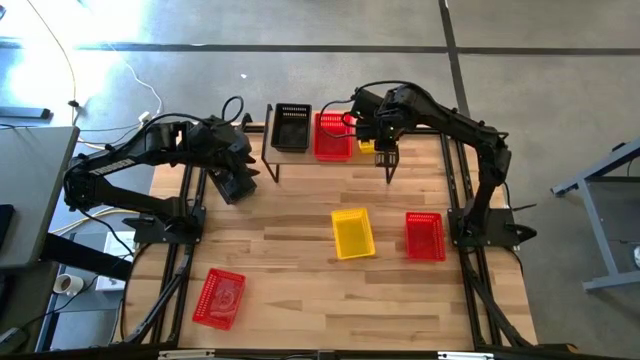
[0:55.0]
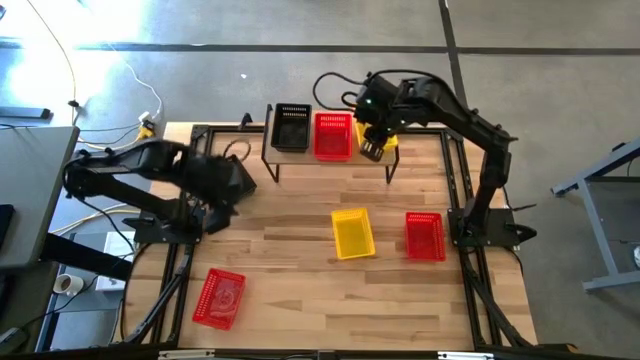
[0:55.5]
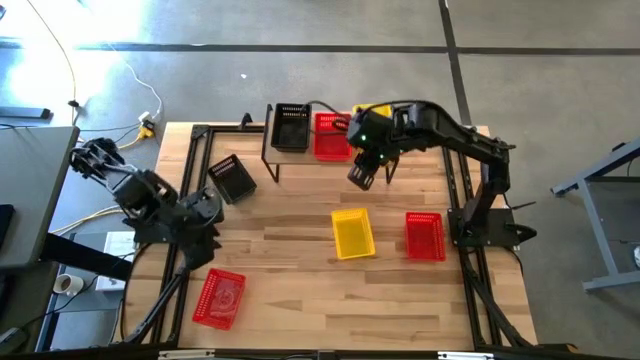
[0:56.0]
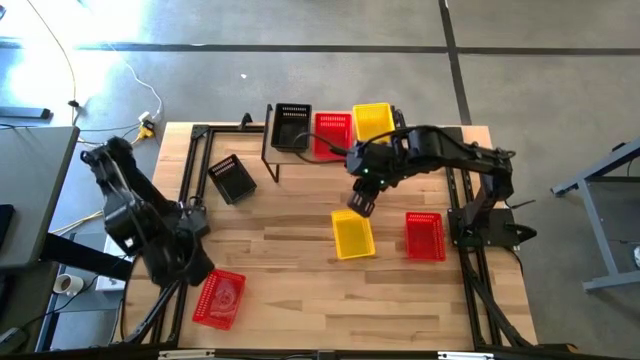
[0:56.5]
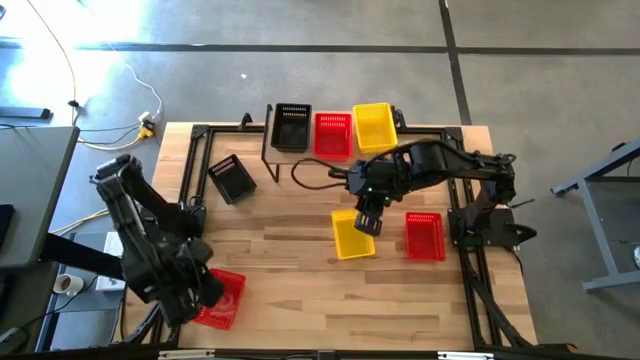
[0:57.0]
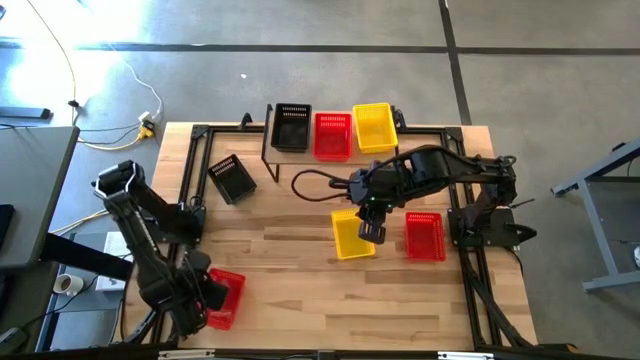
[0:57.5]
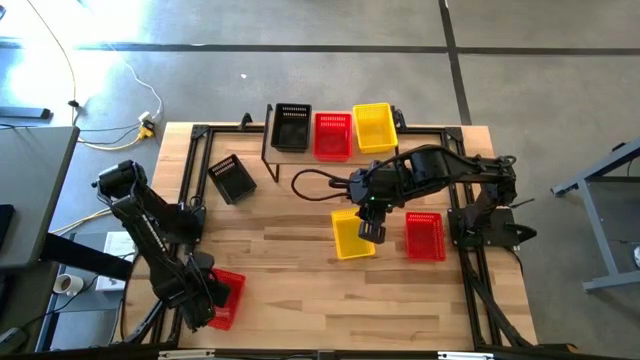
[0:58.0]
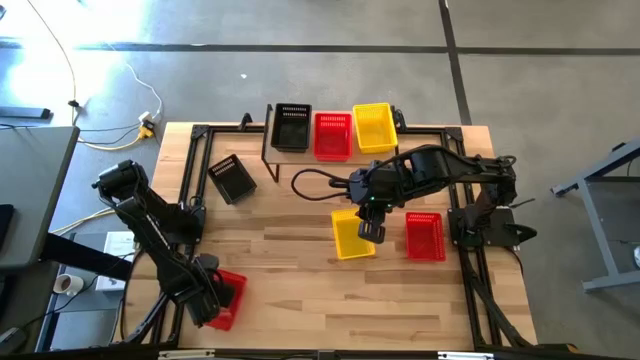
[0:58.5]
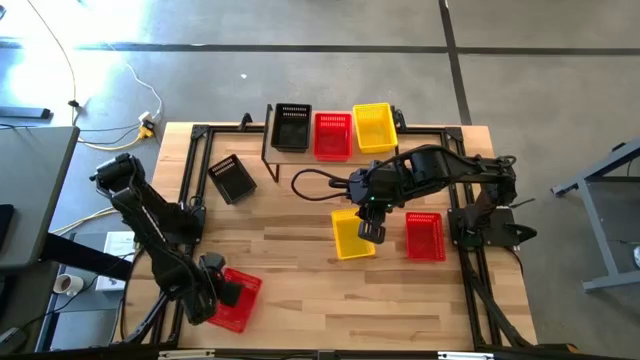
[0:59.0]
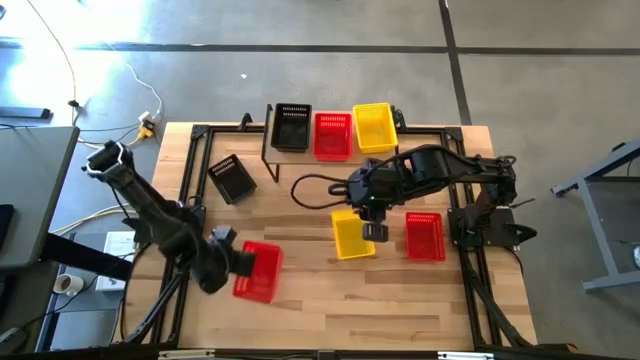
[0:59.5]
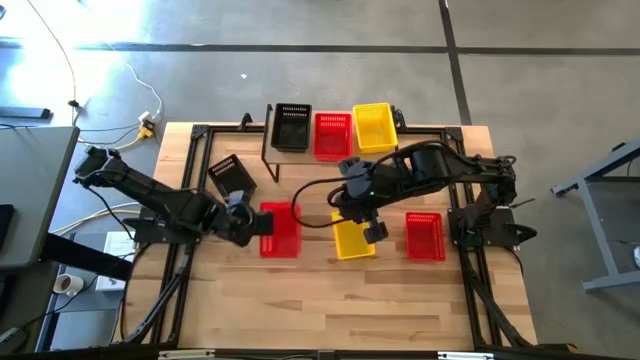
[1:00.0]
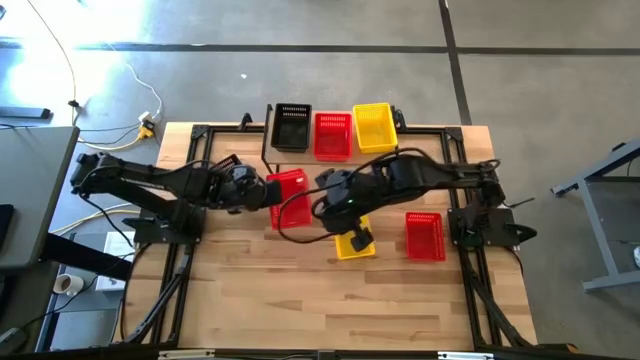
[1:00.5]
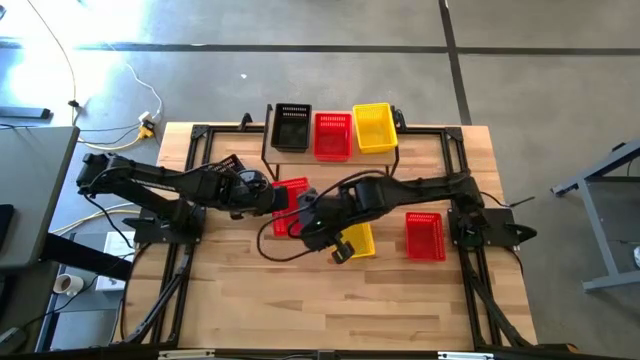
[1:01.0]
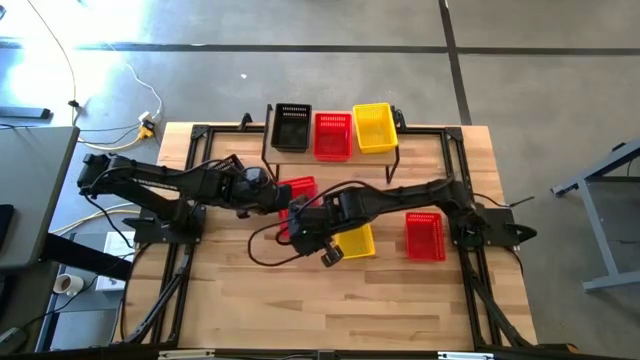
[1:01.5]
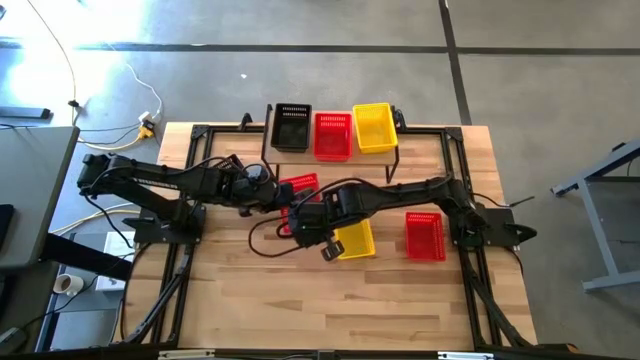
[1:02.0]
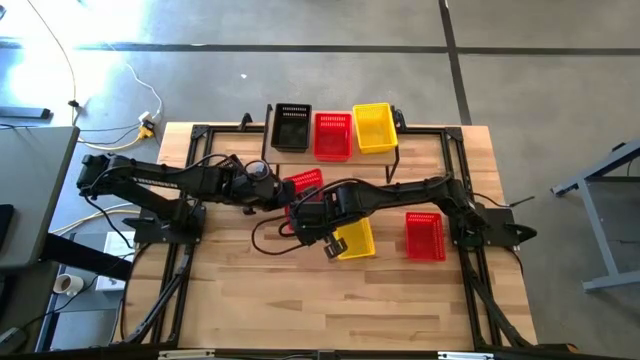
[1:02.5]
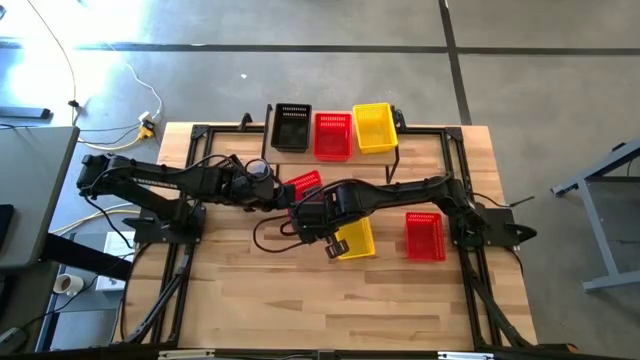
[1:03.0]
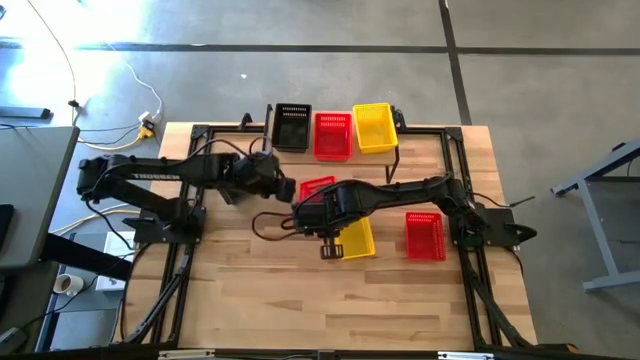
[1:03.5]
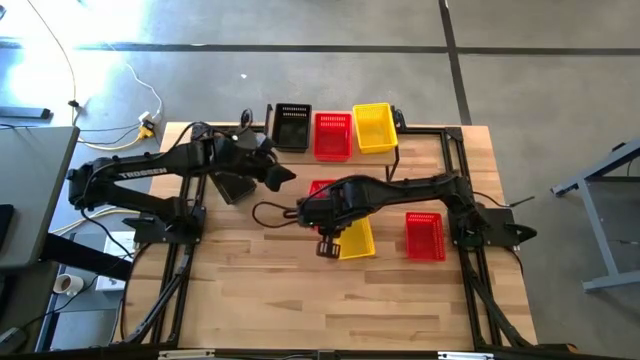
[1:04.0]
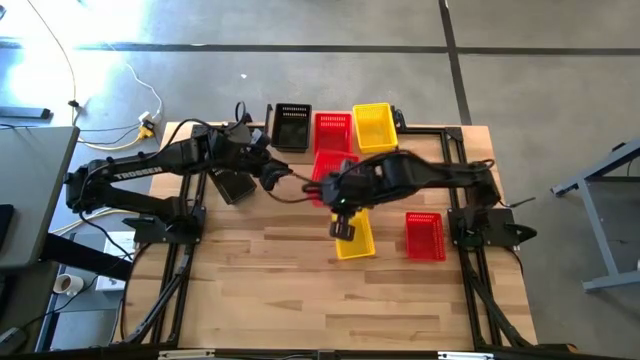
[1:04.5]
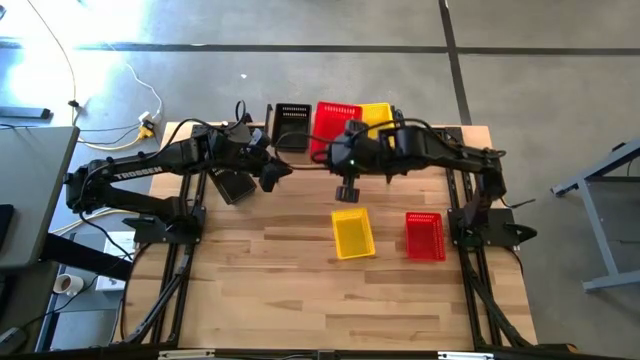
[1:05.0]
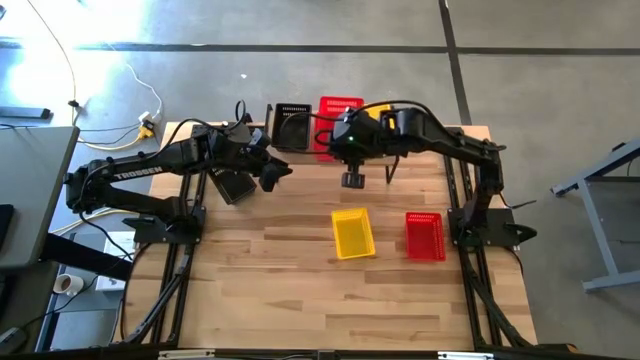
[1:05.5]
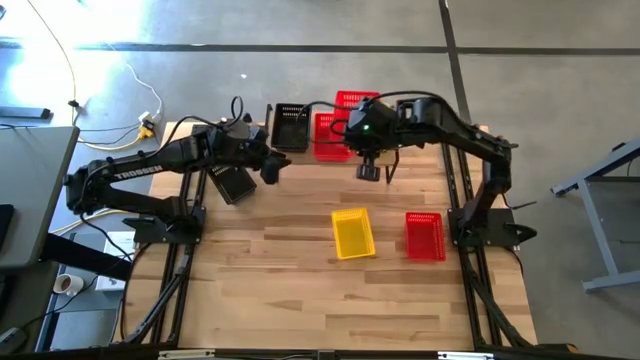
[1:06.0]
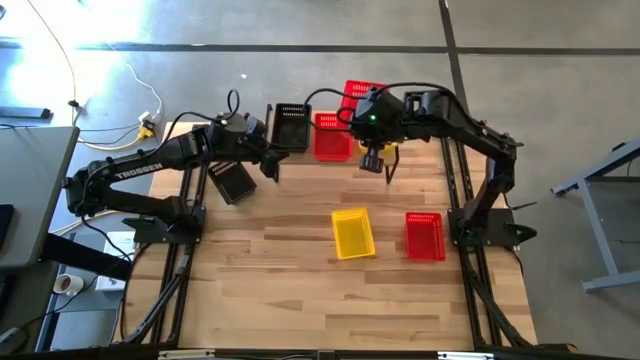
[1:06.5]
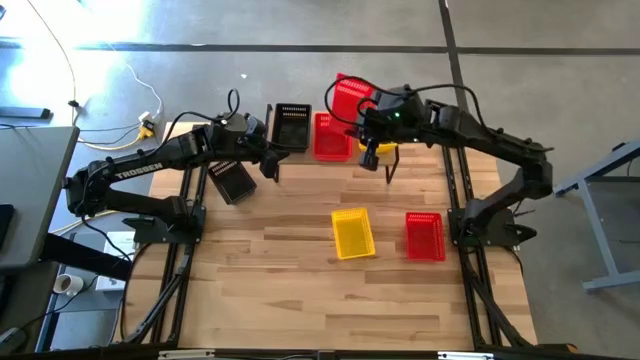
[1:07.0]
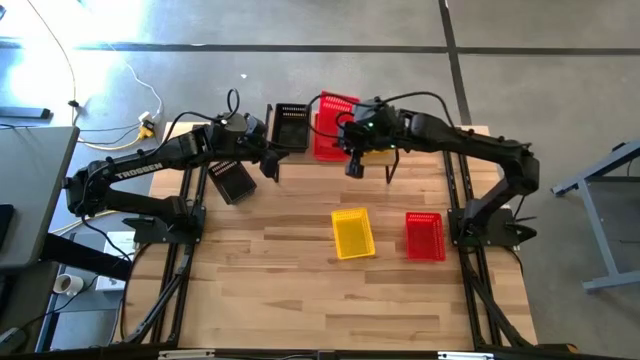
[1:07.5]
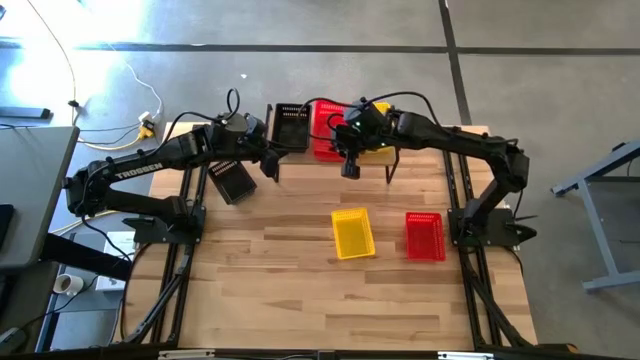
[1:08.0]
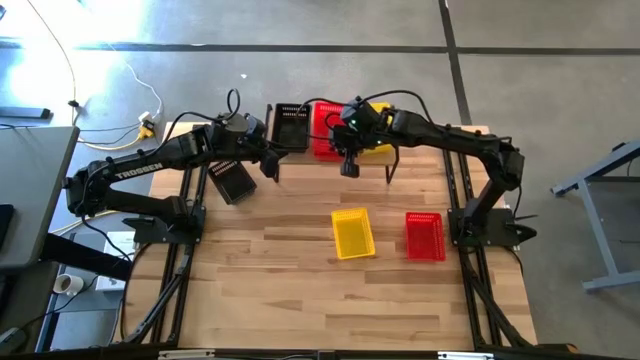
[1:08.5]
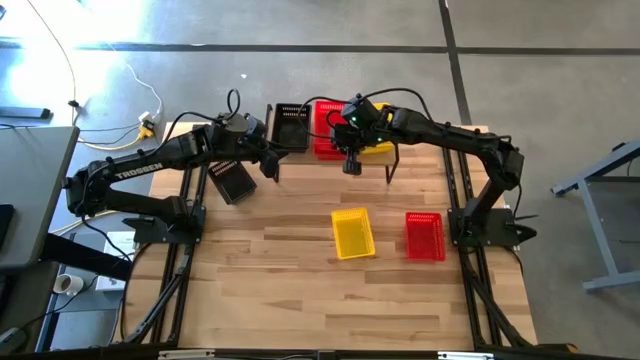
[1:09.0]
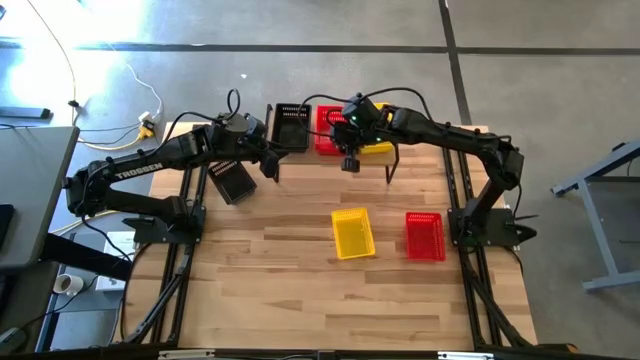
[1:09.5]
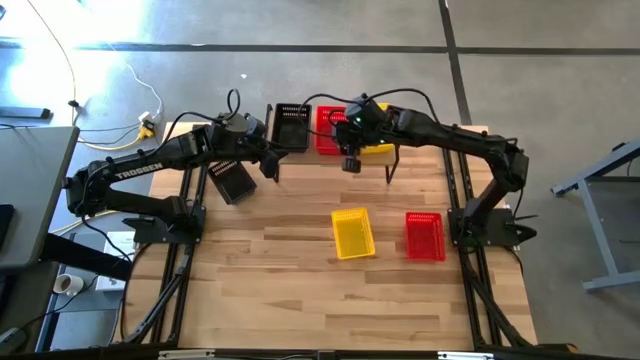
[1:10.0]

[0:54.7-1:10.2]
Task: Stack baskets on shelf by color
Stack the left red basket on top of the red basket on the shelf

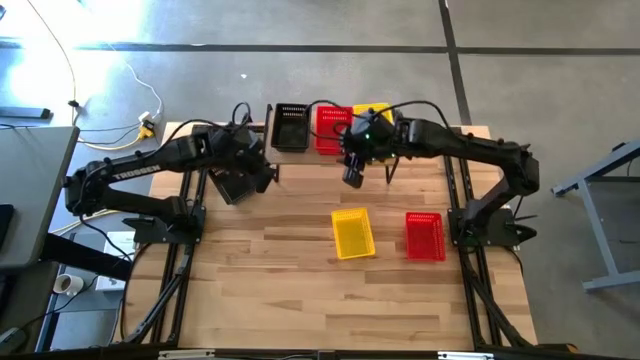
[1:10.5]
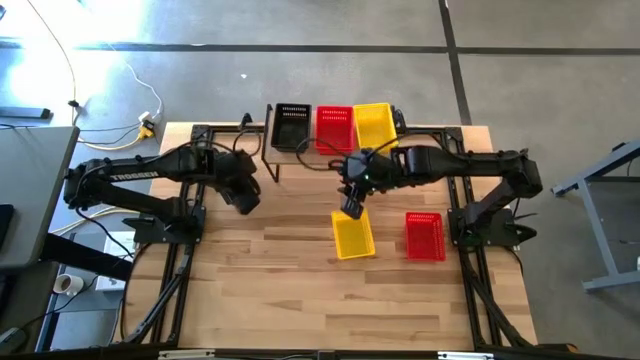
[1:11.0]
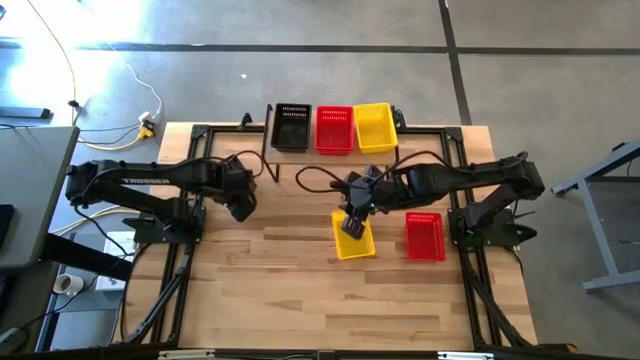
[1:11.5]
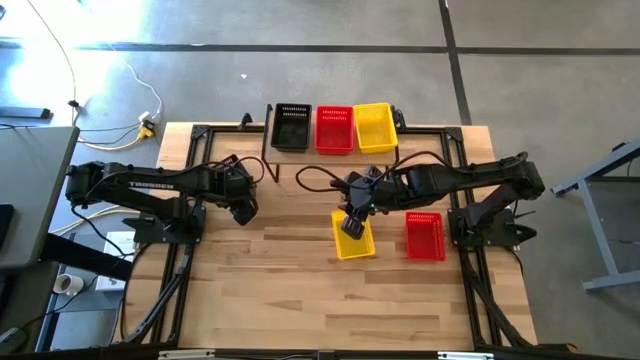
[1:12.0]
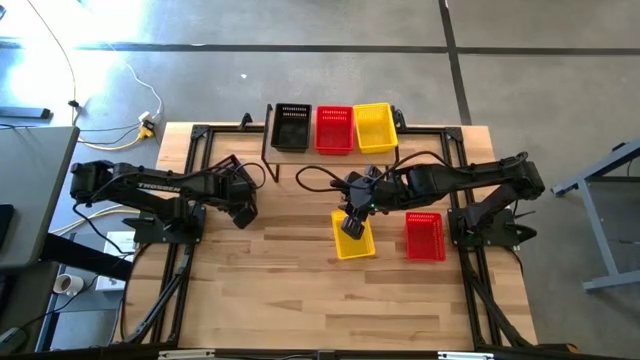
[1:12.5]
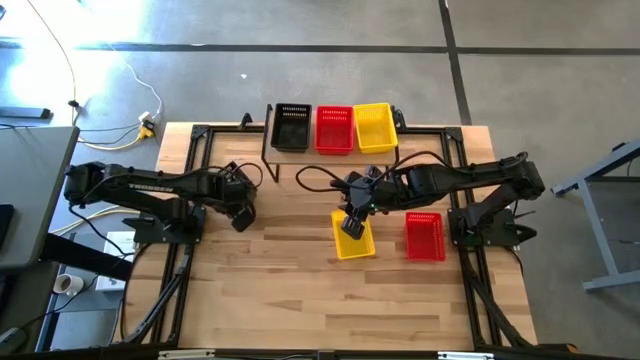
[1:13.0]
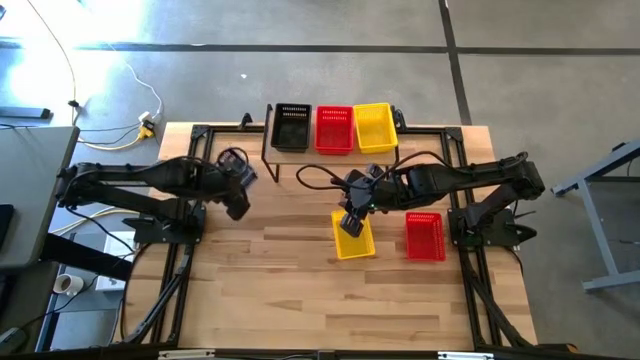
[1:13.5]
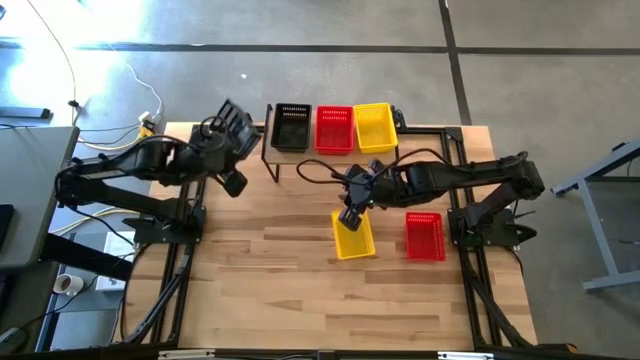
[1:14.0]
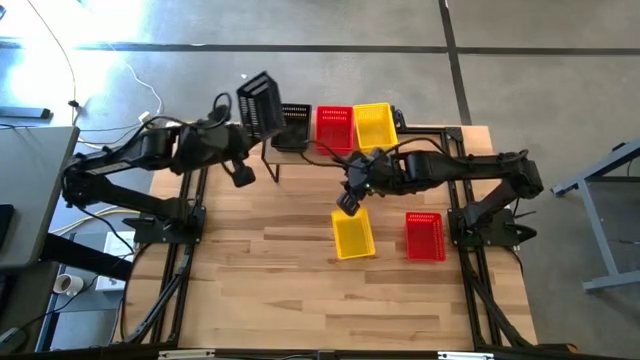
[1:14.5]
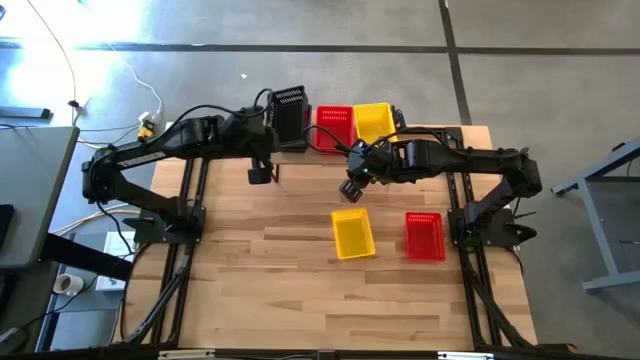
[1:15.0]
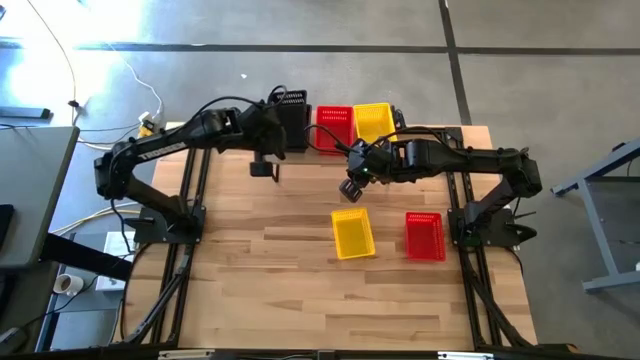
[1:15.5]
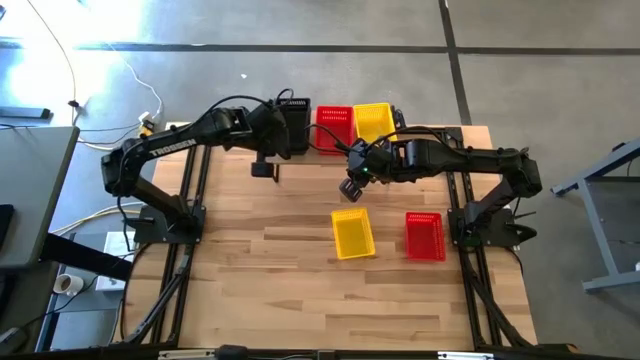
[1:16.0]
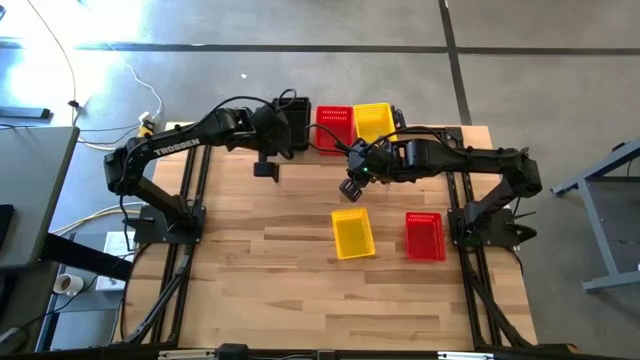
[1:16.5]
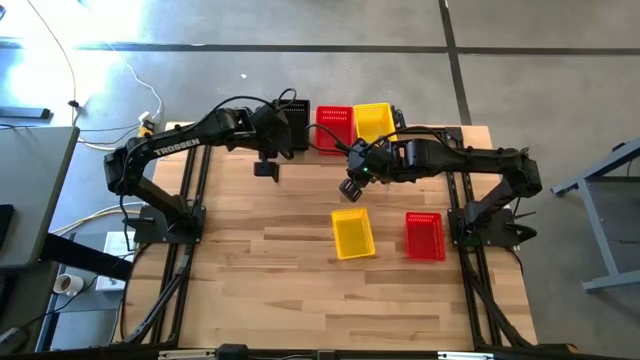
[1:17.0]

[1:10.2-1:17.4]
Stack the black basket on top of the black basket on the shelf
